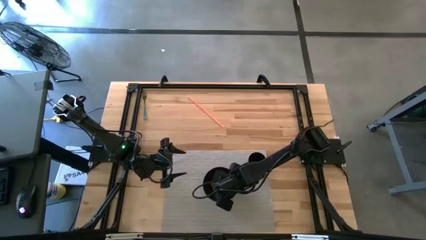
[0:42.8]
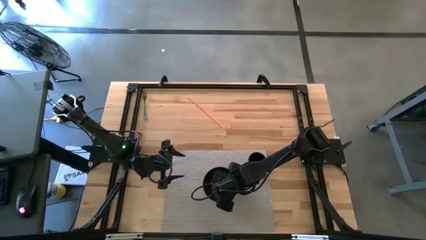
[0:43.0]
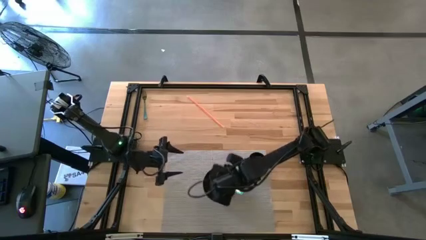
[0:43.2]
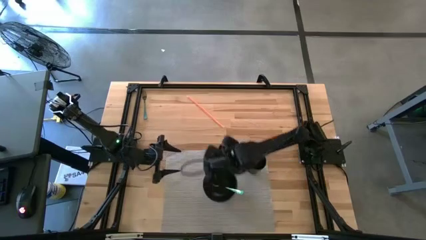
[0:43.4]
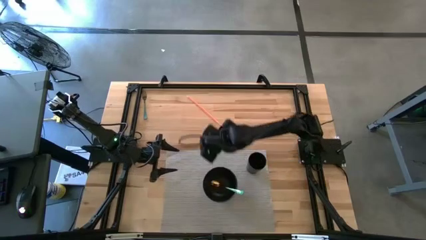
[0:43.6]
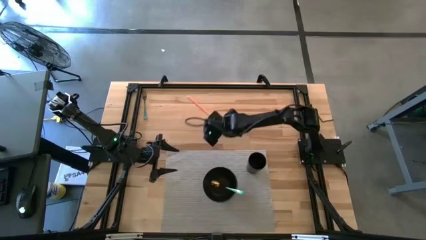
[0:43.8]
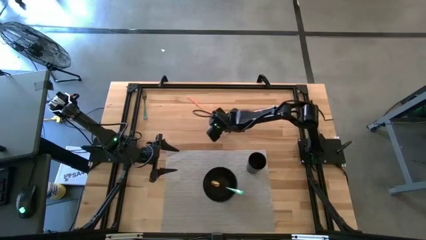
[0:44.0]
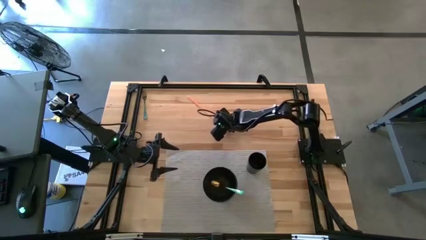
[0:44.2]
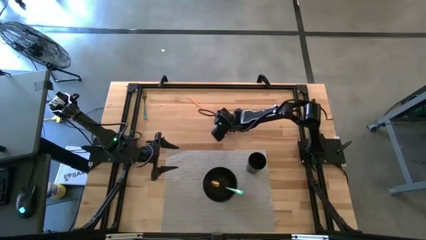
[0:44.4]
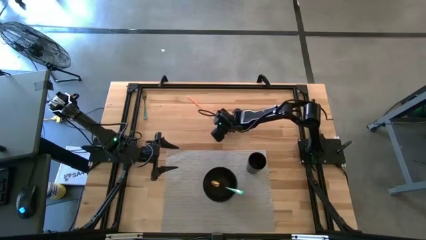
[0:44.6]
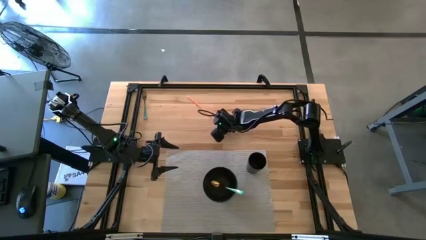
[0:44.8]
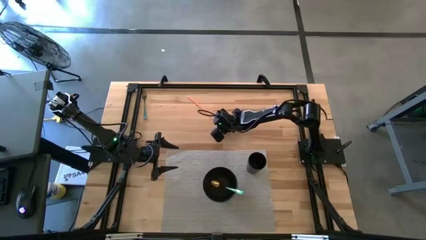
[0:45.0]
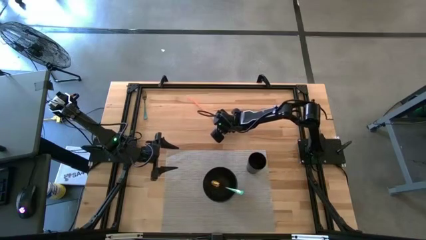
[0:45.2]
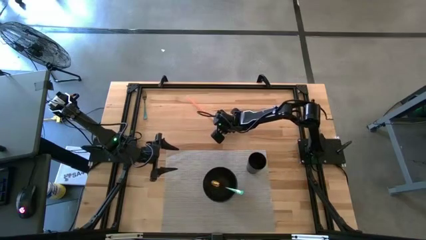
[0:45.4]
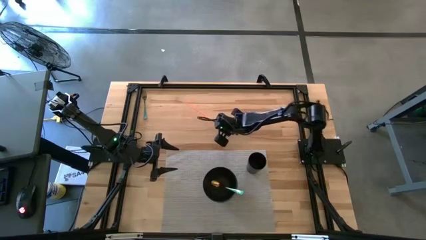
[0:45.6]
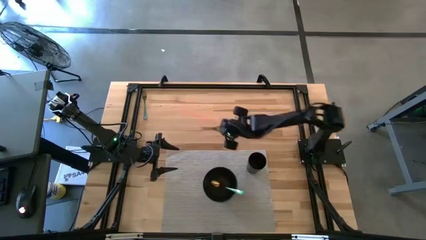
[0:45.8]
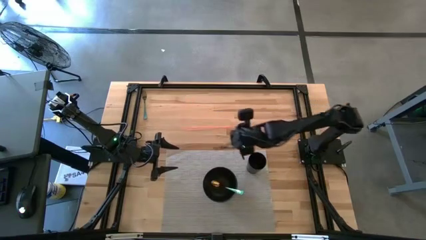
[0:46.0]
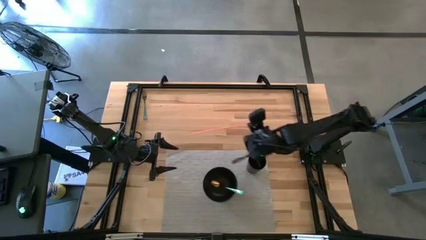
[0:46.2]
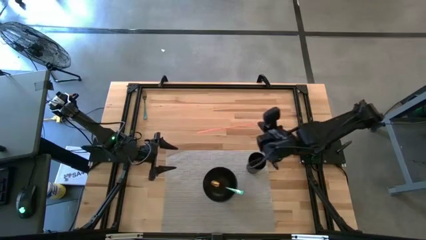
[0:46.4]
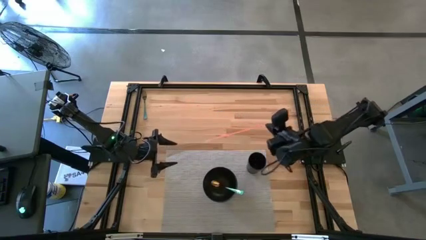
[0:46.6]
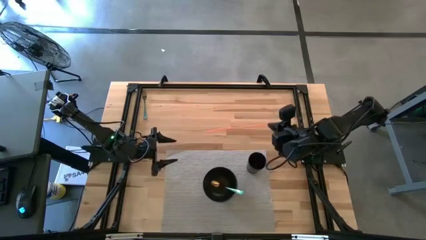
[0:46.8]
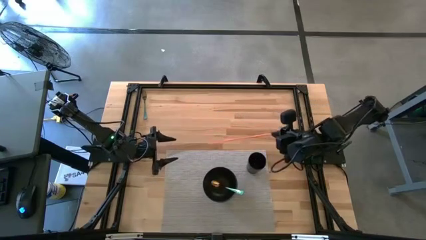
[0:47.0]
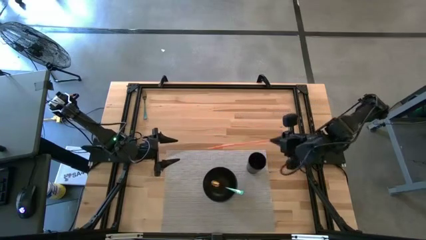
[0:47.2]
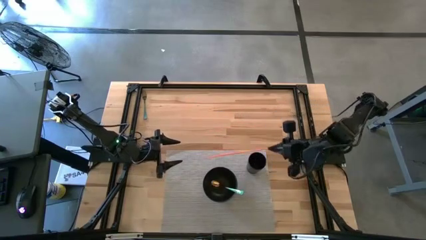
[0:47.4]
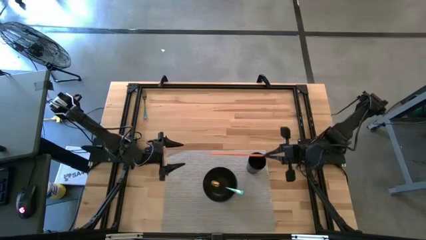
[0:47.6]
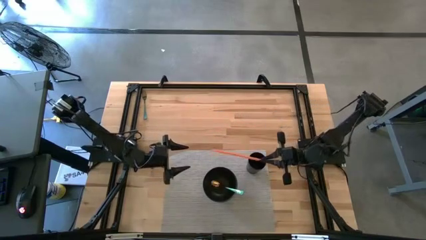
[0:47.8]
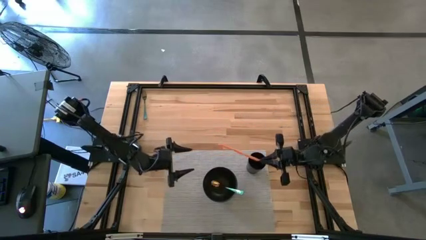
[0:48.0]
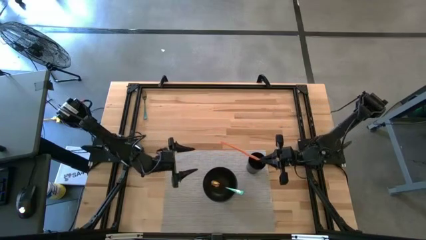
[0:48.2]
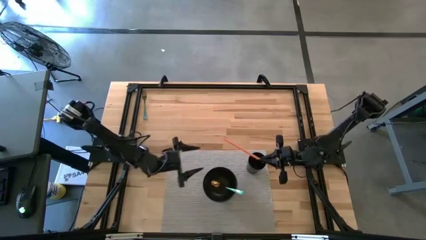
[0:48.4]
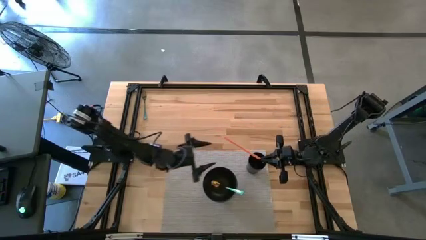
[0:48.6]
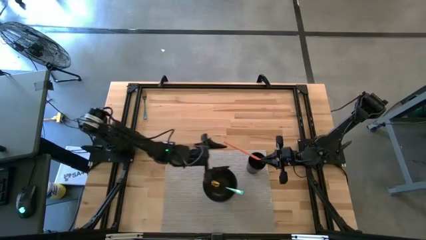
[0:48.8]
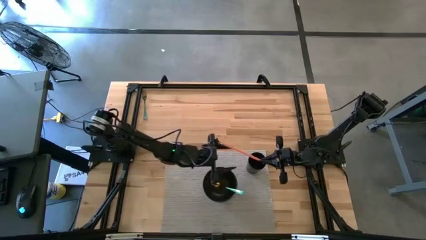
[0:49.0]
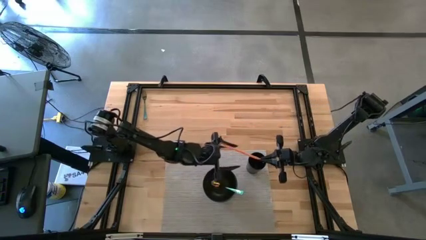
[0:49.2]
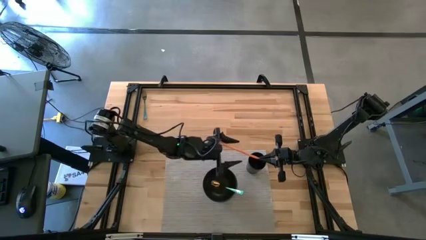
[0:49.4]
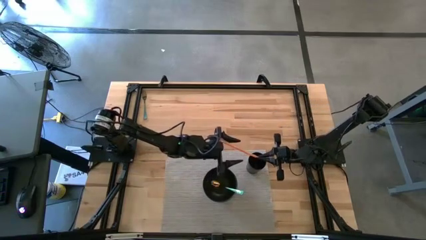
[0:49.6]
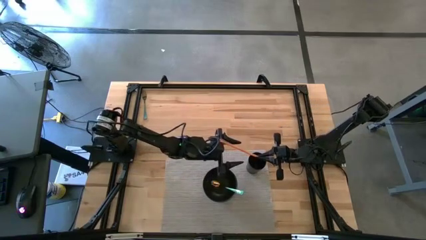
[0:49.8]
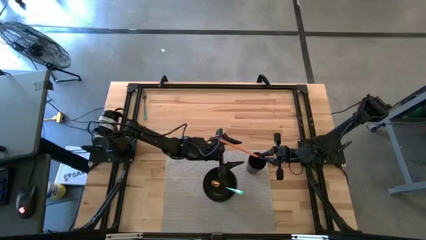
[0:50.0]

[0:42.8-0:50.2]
Task: Pick & Place Utensil
Put the orange straw into the black cup

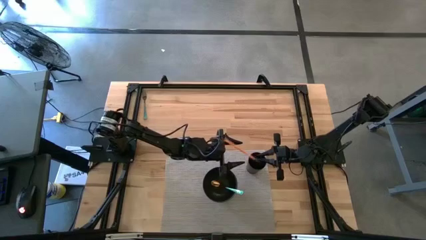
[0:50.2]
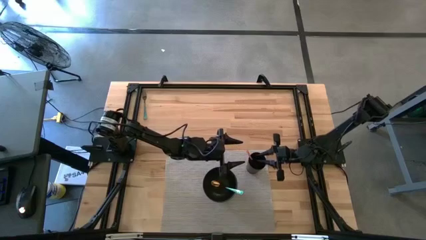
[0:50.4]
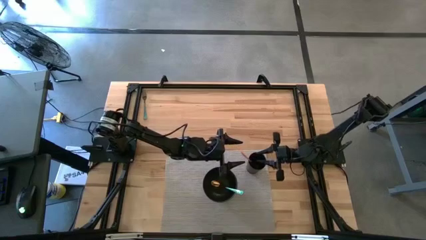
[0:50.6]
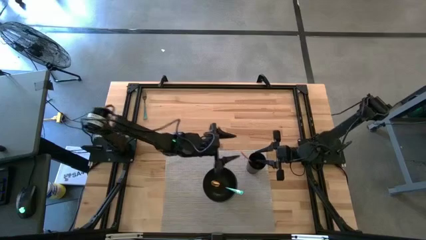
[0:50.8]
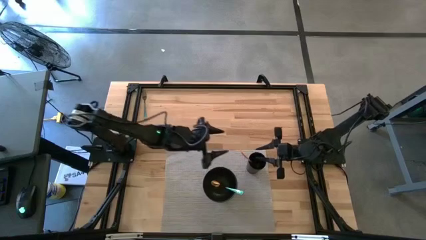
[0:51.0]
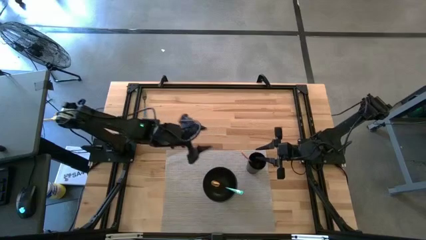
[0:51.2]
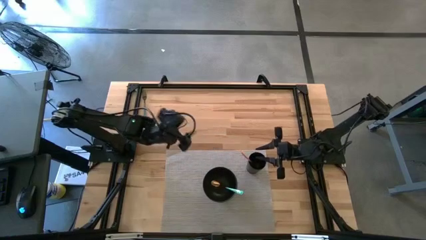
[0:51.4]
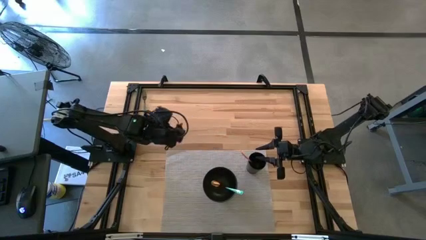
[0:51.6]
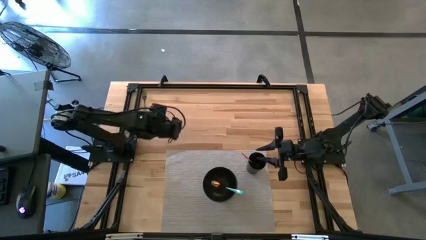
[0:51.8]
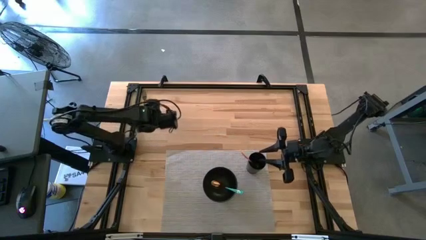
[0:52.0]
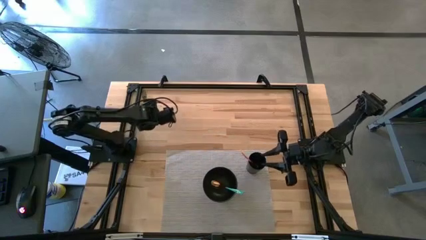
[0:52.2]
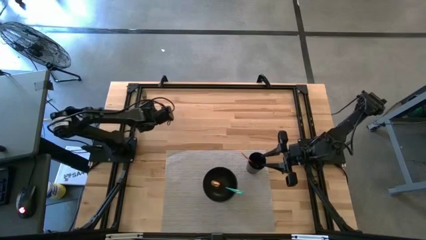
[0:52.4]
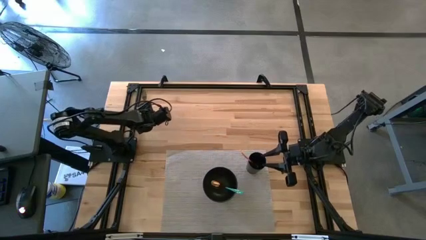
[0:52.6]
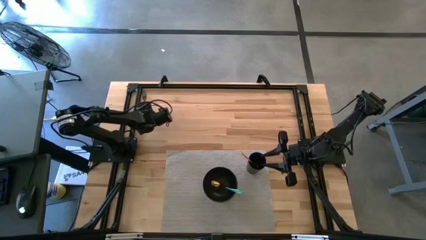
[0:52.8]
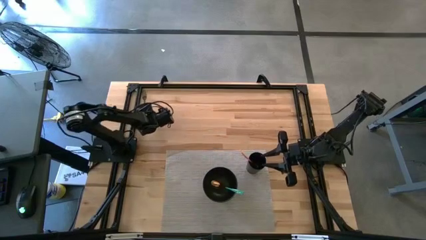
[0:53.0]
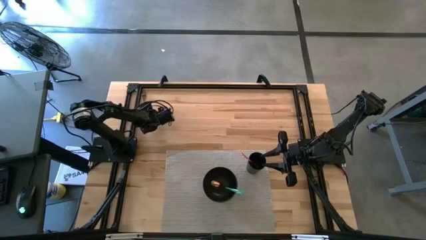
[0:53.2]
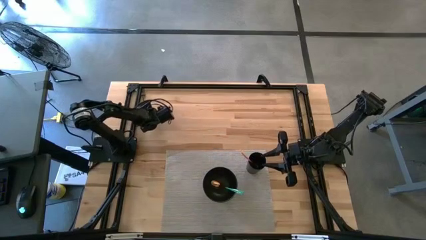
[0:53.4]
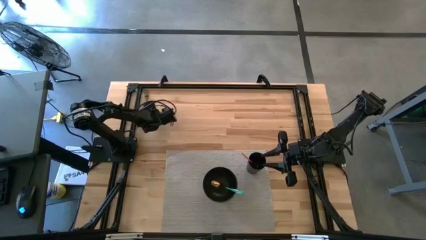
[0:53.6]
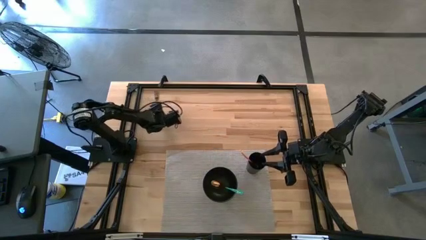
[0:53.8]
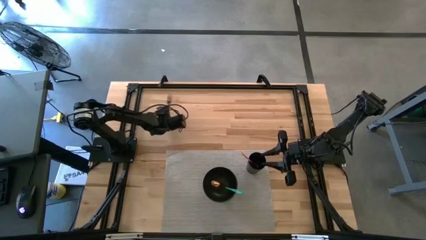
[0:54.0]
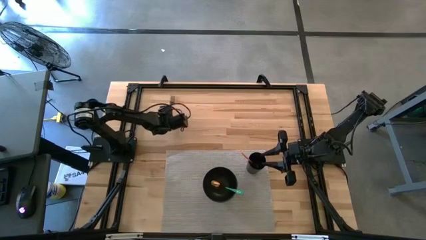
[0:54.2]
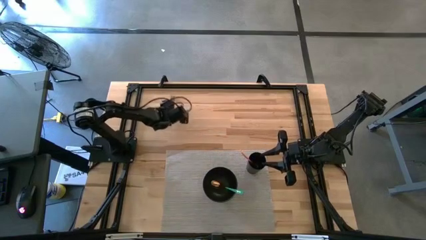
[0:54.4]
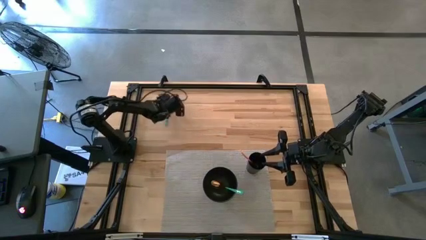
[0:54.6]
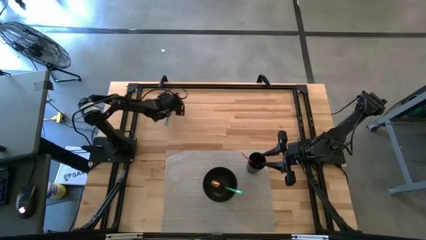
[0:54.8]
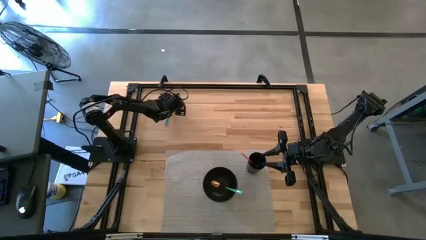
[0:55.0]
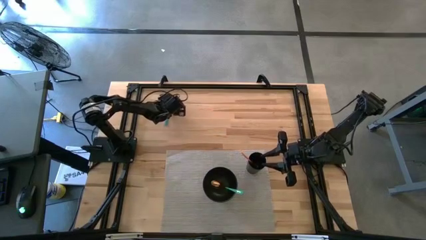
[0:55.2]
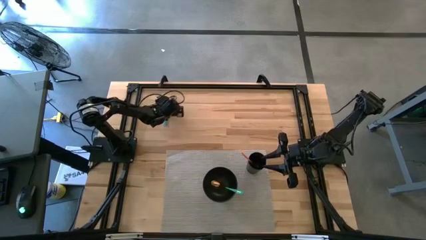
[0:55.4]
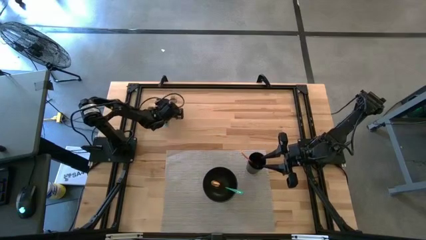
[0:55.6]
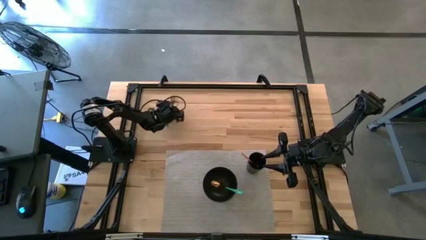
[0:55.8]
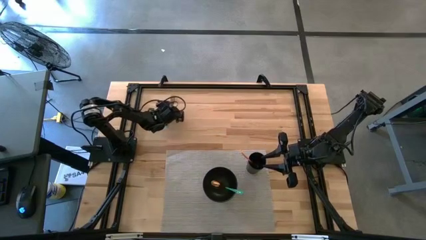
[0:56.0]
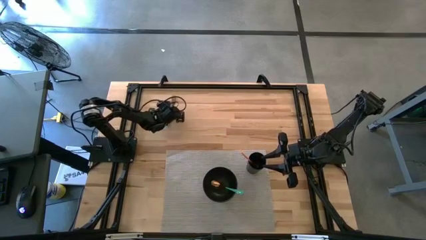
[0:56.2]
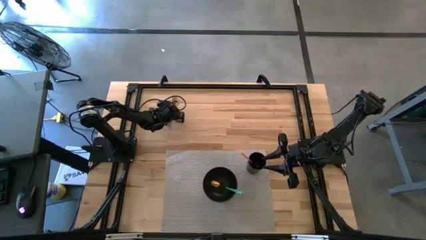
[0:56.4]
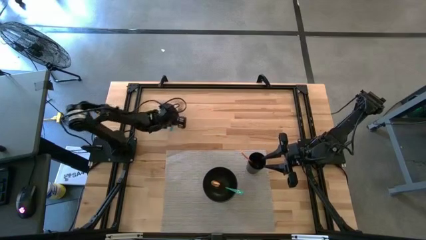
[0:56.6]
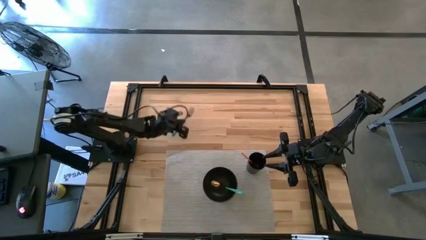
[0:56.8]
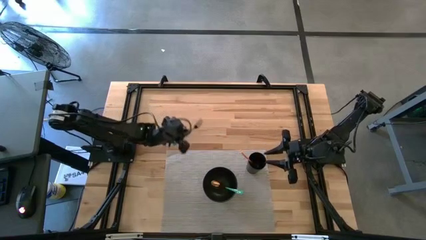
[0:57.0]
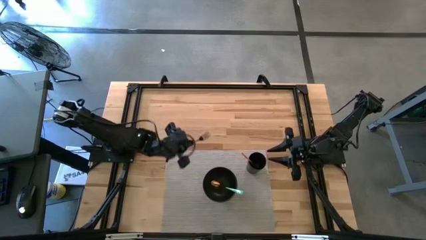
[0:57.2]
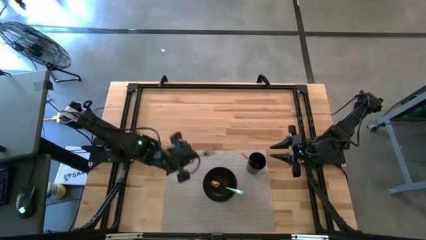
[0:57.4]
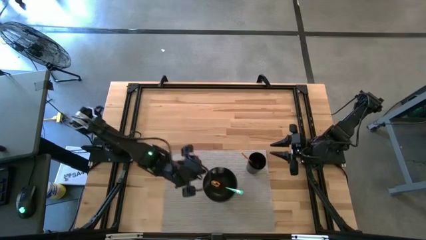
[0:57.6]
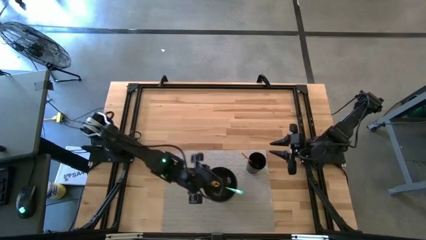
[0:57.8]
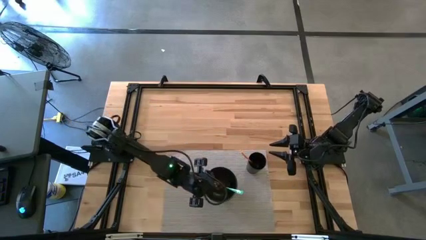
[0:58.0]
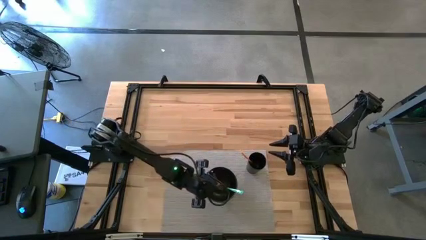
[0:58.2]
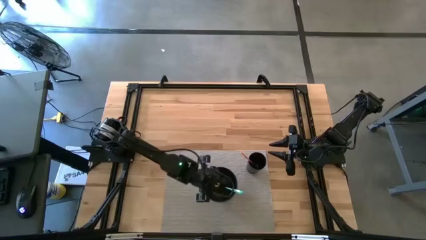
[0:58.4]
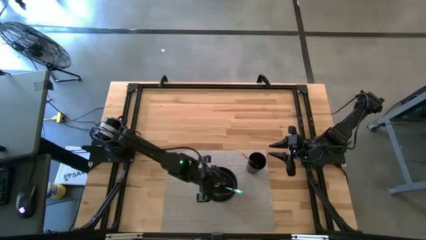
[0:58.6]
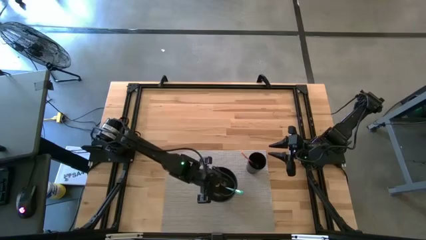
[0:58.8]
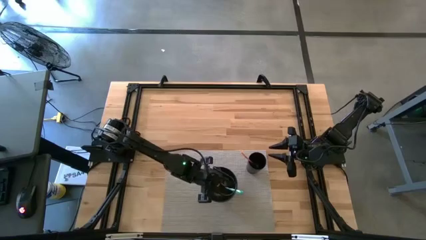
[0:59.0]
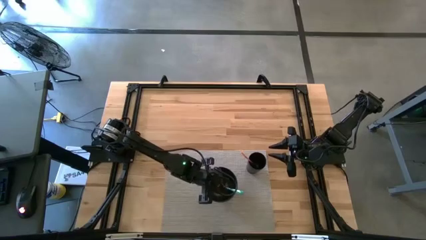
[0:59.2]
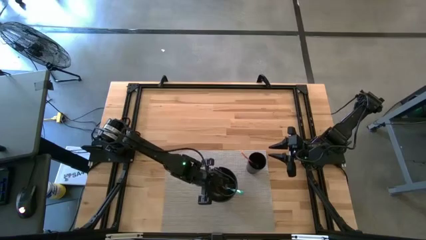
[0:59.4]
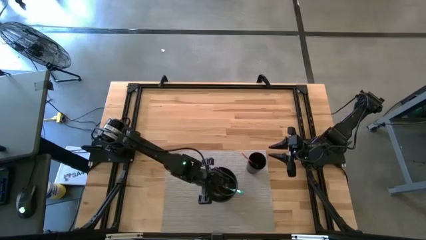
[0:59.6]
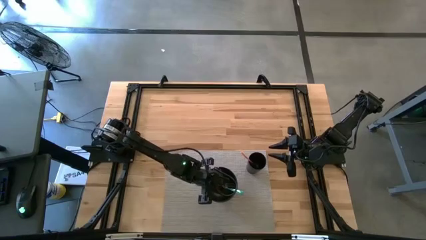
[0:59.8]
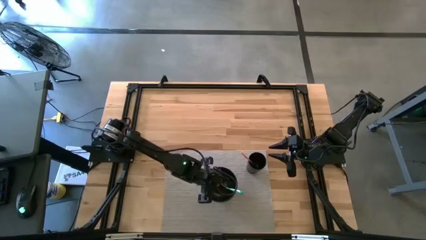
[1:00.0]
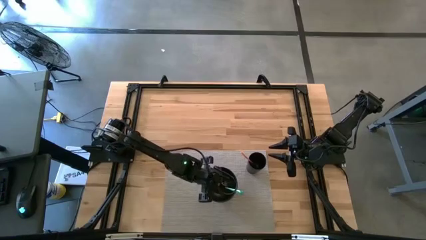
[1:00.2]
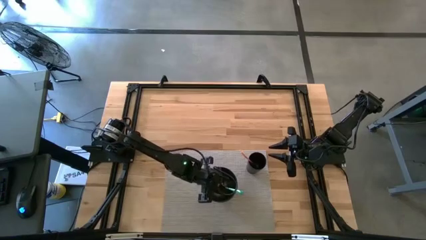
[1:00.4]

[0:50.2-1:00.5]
Put the blue fork into the black bowl
